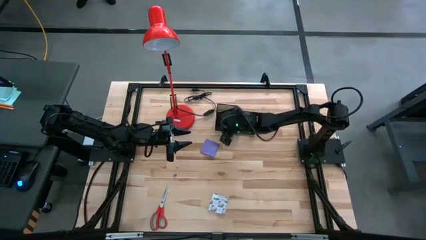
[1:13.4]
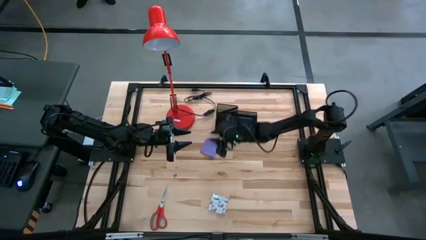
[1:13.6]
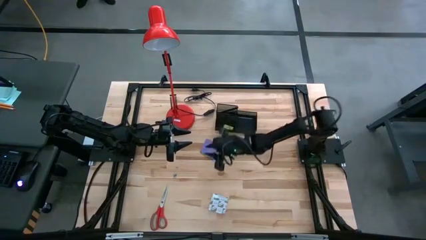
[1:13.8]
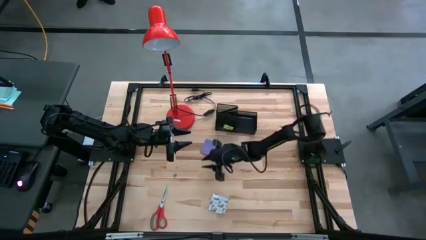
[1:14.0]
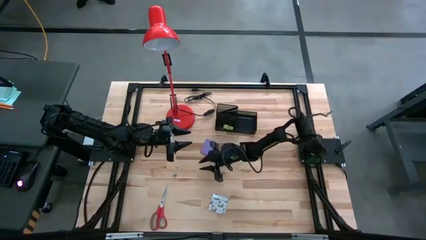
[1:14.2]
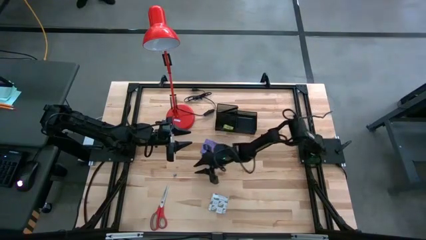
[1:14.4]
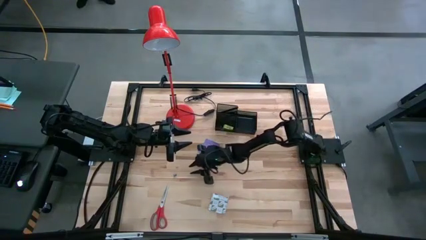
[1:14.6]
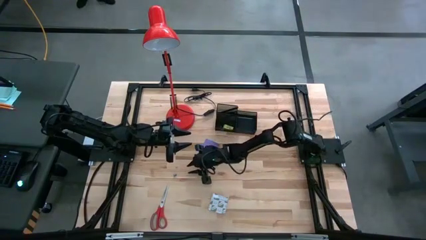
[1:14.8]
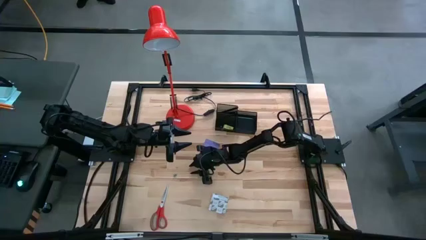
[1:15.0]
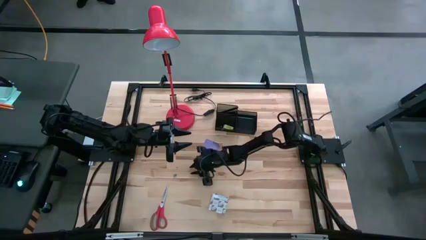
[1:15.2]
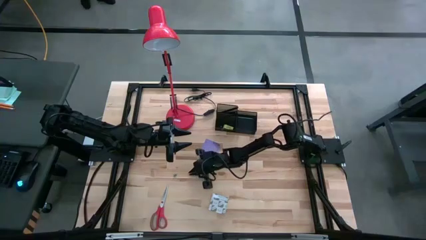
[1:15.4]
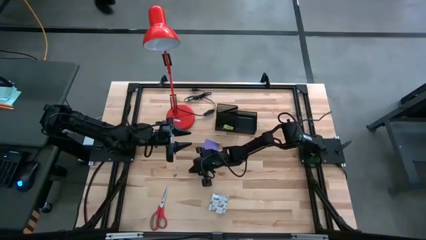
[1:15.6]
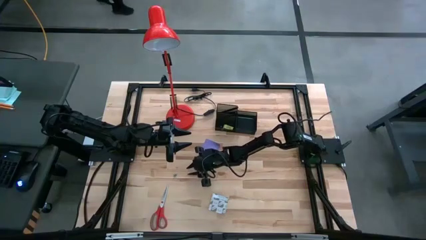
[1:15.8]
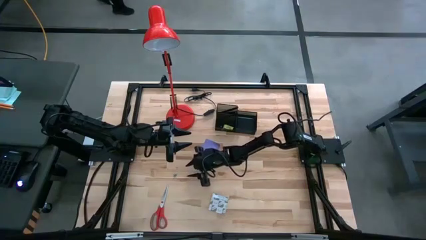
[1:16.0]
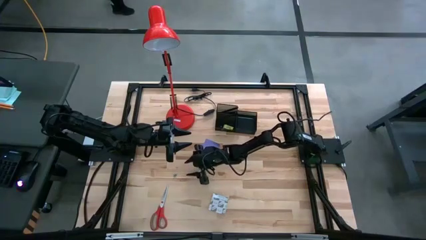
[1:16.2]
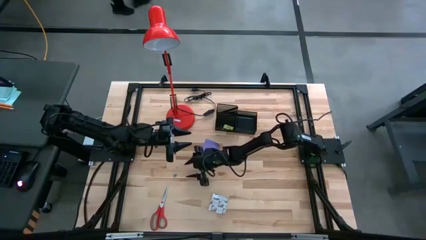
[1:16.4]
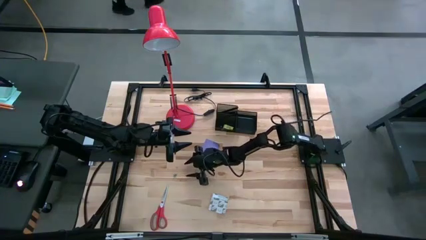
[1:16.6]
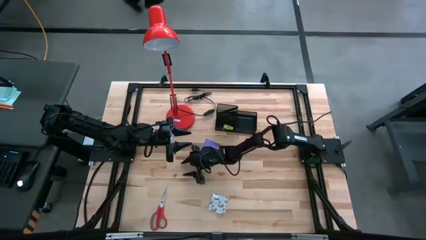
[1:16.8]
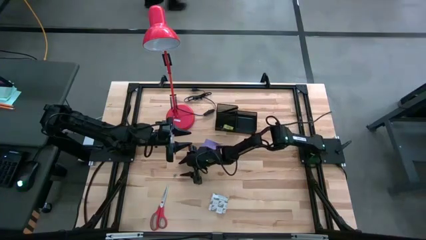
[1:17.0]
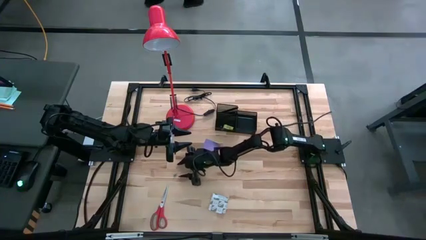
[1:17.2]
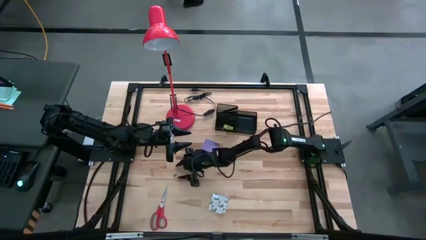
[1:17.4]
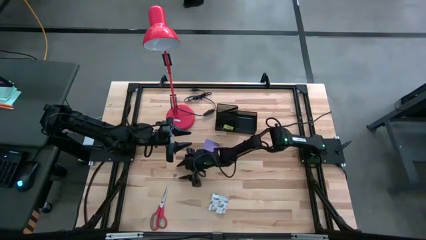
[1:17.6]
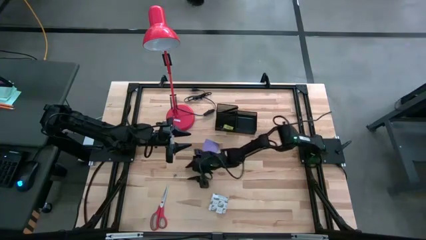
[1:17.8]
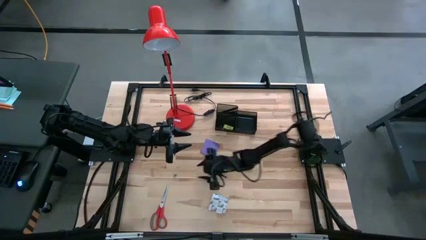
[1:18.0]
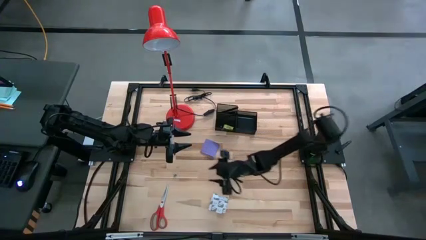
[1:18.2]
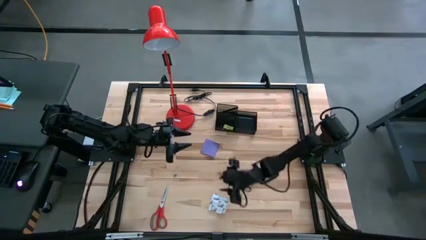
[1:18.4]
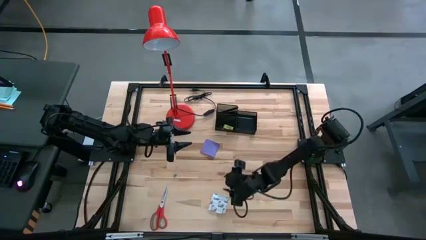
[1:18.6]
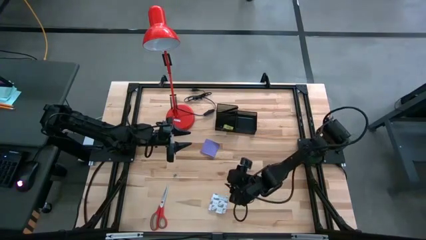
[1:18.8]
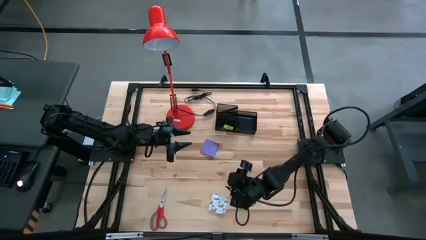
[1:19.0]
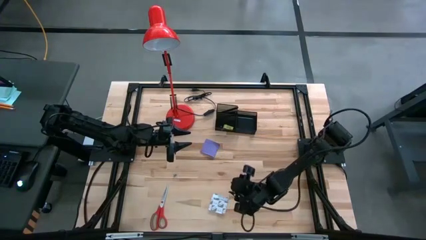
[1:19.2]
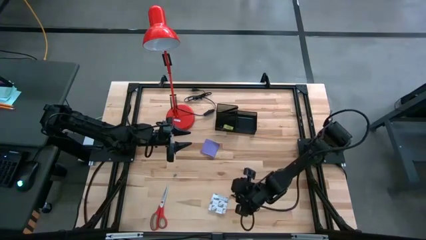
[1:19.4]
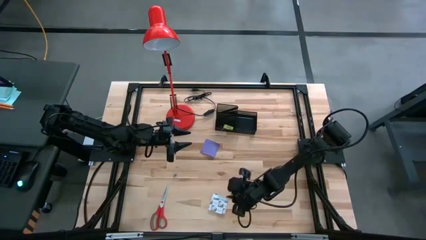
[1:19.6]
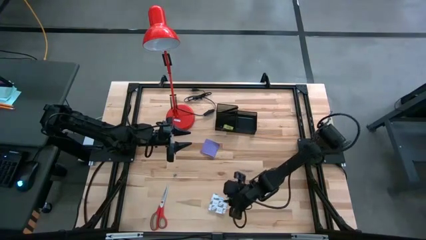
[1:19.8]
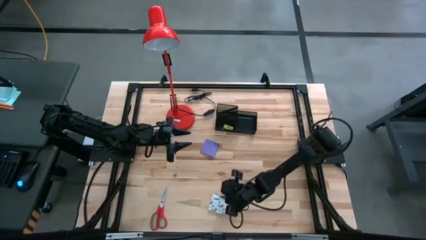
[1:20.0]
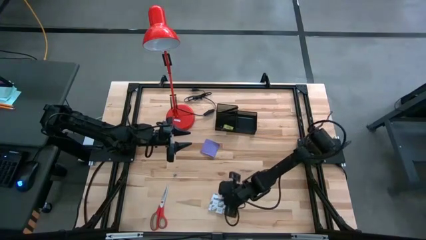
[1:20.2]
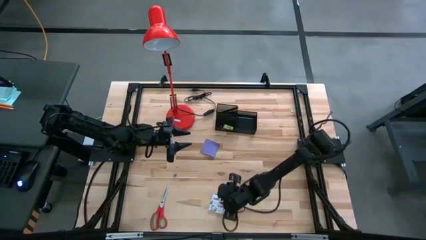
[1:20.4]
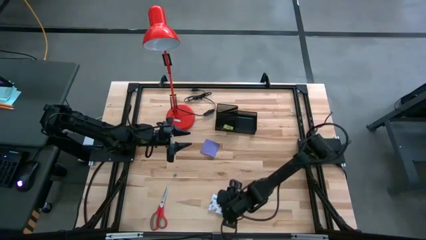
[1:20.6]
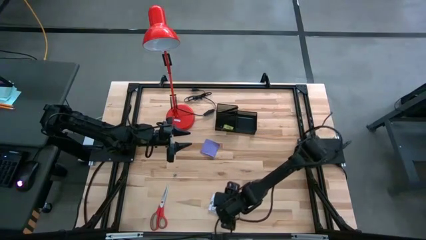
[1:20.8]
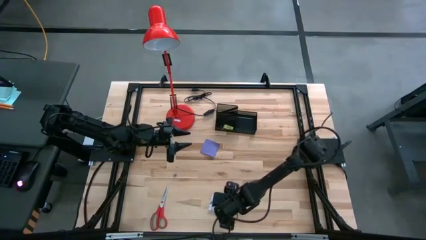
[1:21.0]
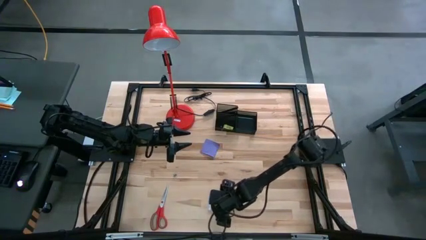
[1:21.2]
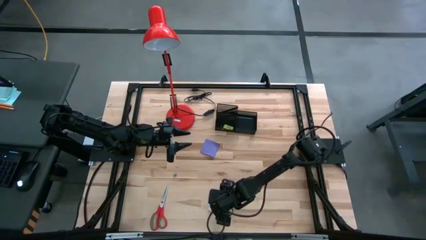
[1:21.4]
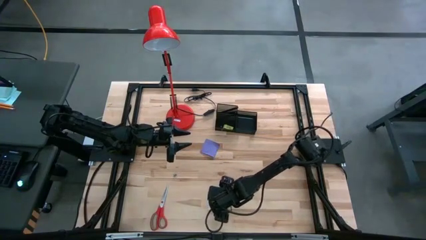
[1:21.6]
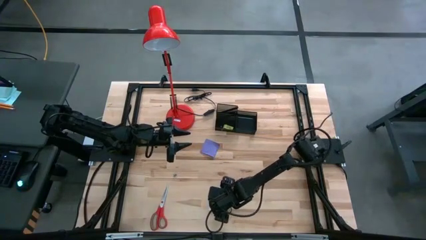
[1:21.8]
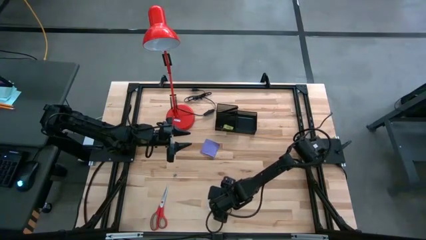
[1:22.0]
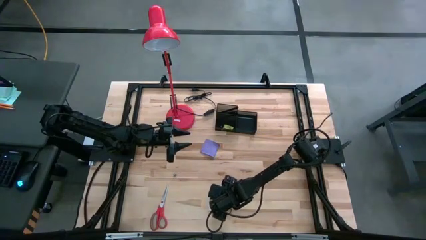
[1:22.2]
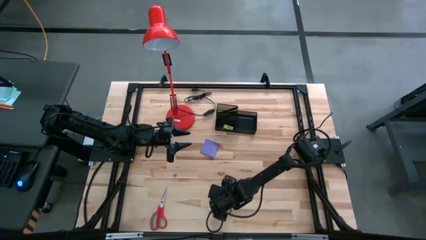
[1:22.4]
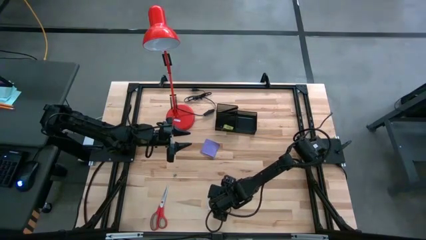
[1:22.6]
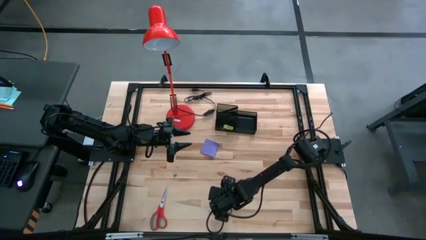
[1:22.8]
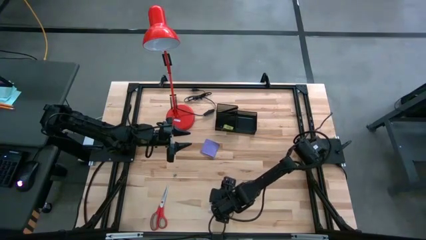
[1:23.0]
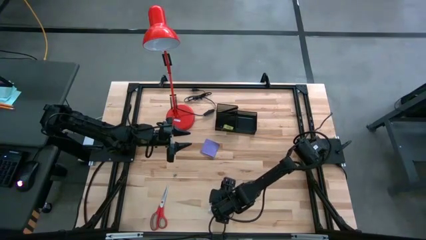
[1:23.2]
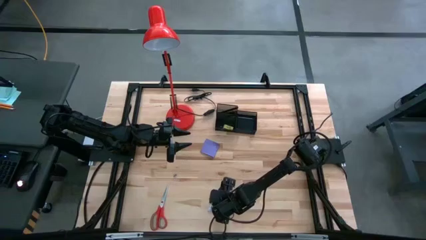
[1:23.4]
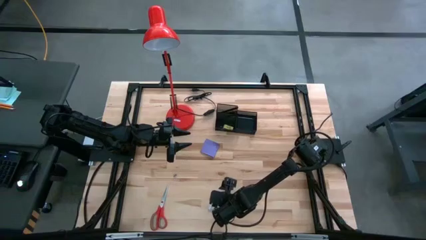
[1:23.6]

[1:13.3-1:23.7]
Task: Pick and place office supplies into organizer
Put the white sticky notes into the black desk organizer
